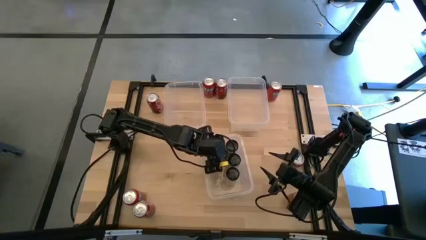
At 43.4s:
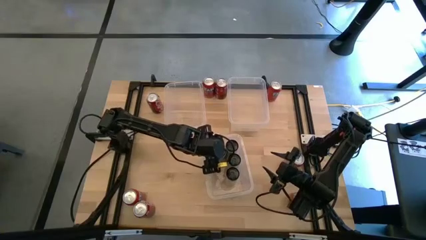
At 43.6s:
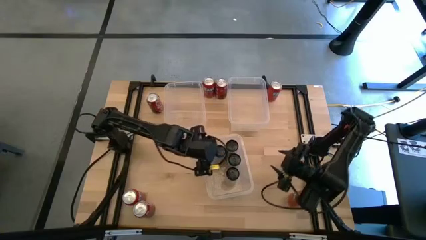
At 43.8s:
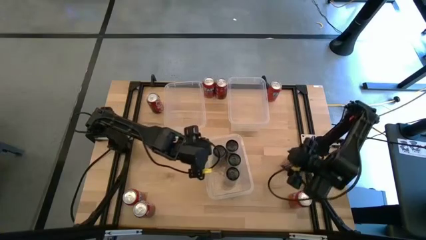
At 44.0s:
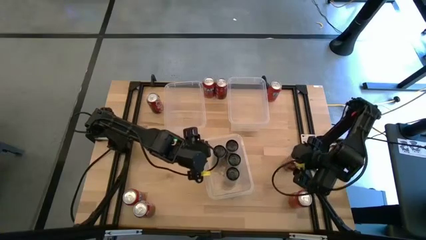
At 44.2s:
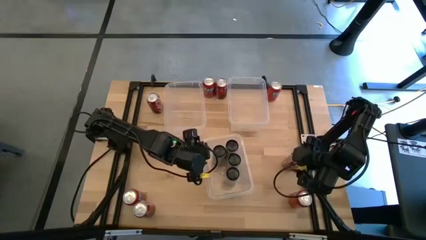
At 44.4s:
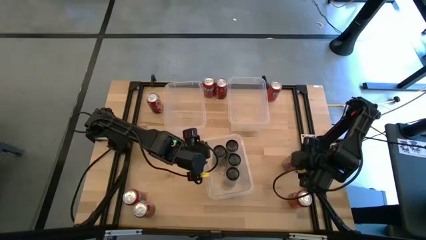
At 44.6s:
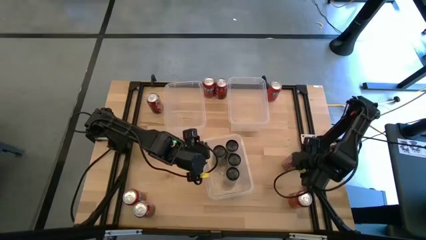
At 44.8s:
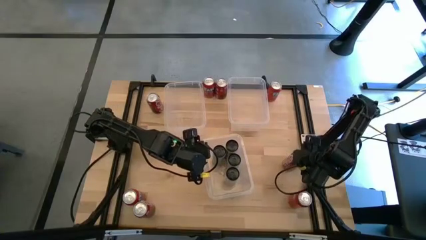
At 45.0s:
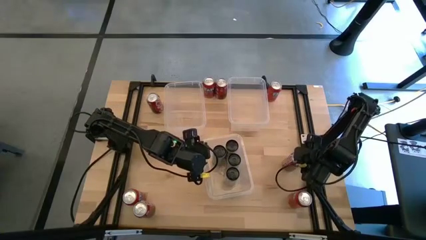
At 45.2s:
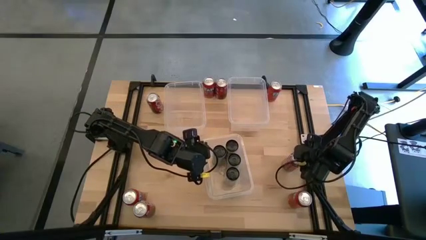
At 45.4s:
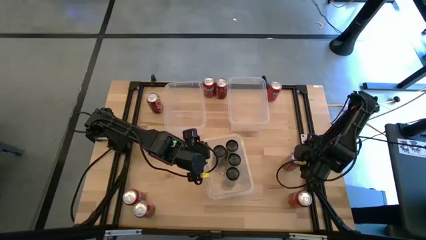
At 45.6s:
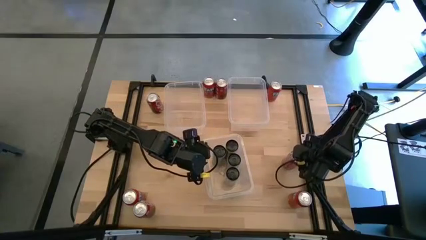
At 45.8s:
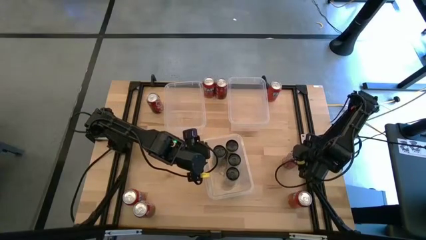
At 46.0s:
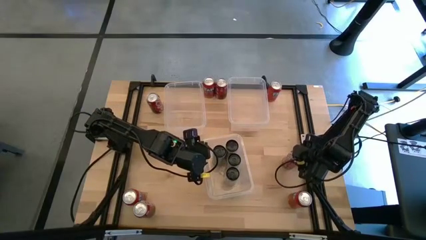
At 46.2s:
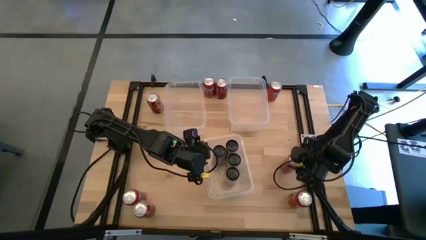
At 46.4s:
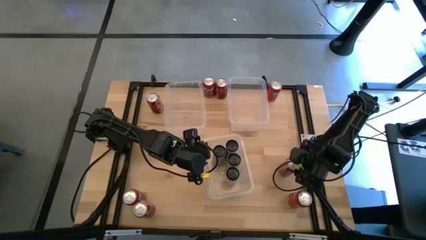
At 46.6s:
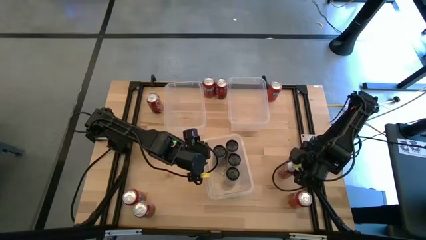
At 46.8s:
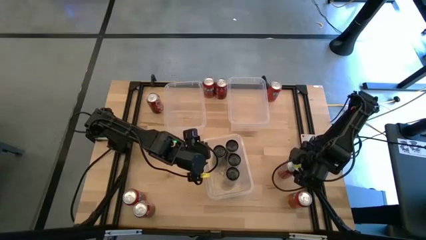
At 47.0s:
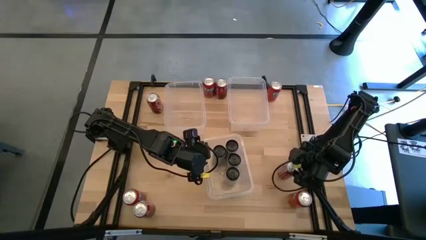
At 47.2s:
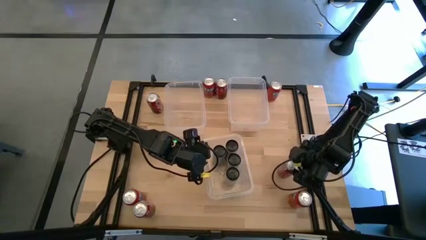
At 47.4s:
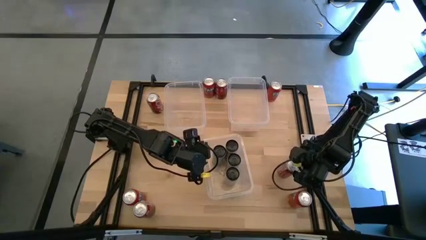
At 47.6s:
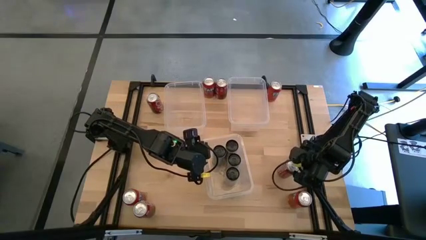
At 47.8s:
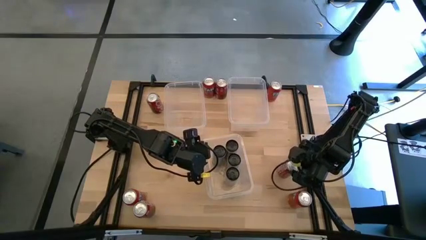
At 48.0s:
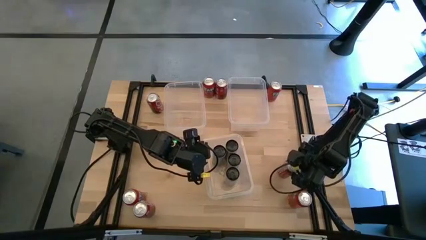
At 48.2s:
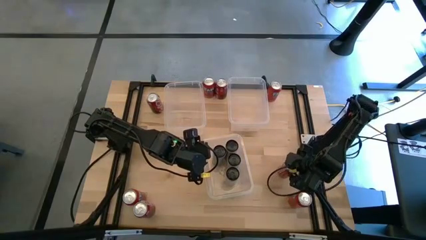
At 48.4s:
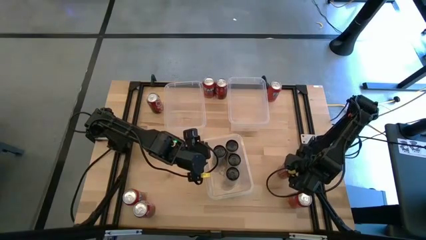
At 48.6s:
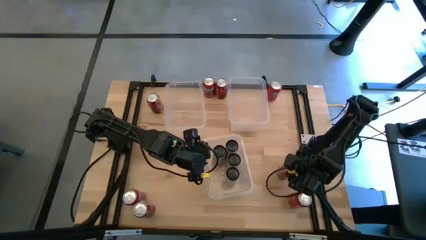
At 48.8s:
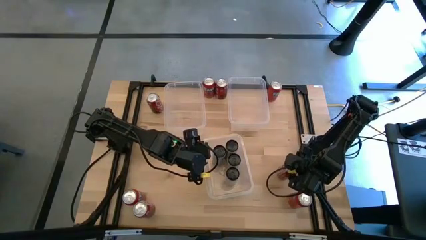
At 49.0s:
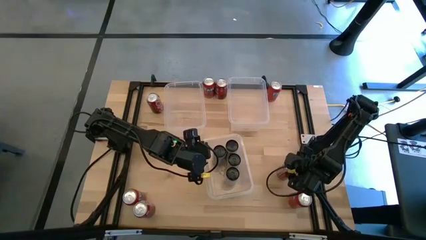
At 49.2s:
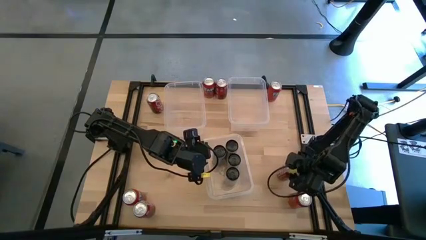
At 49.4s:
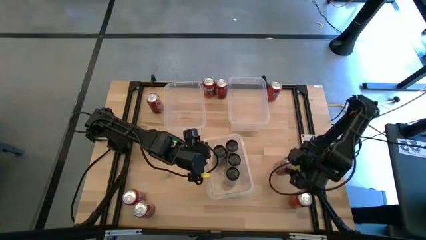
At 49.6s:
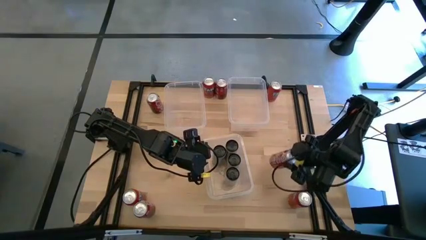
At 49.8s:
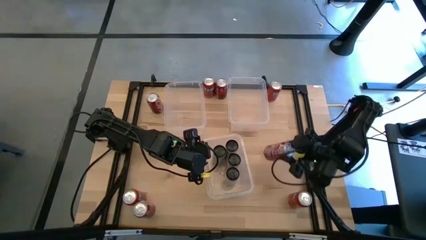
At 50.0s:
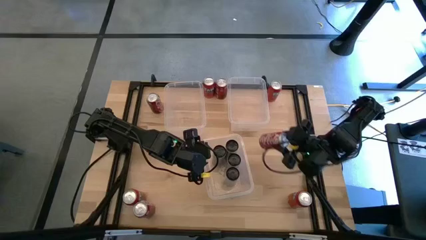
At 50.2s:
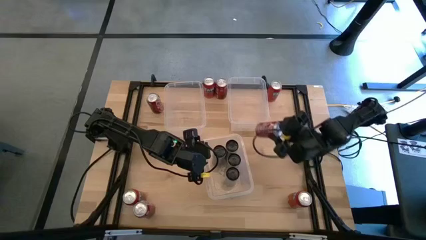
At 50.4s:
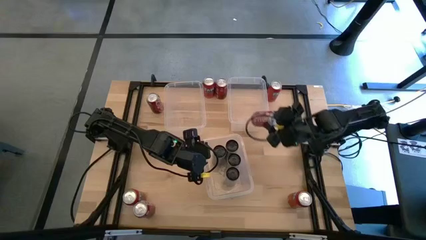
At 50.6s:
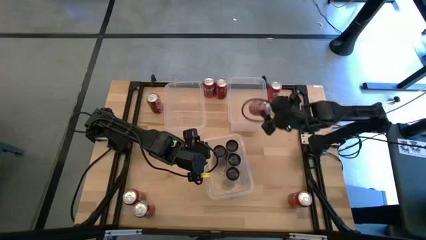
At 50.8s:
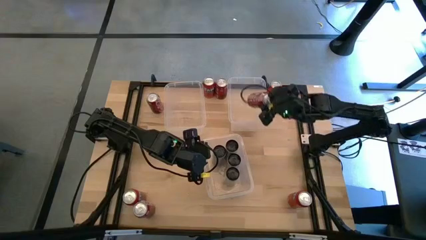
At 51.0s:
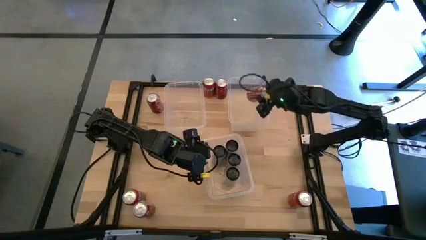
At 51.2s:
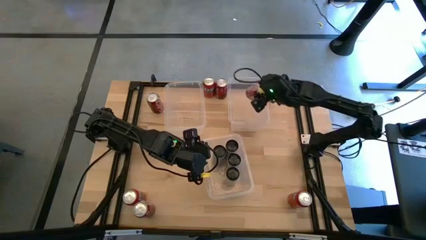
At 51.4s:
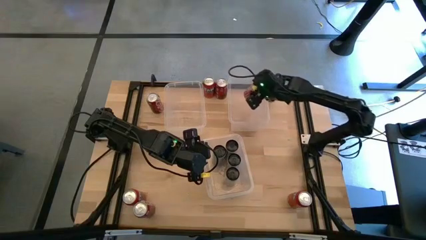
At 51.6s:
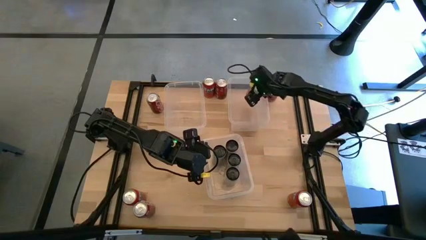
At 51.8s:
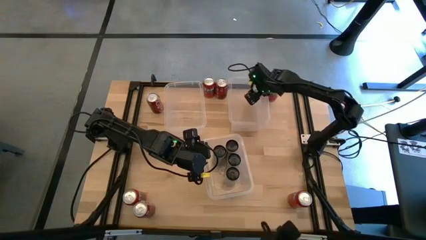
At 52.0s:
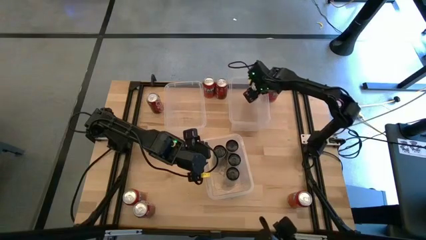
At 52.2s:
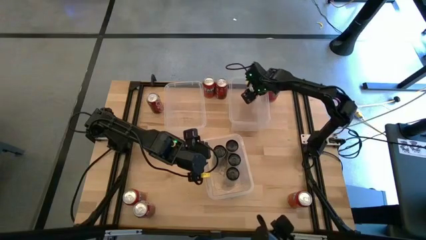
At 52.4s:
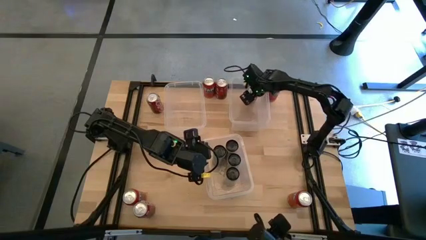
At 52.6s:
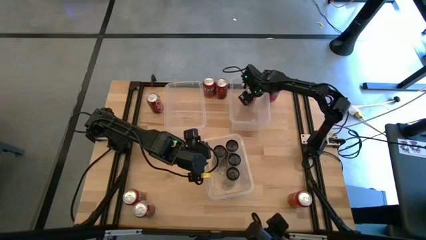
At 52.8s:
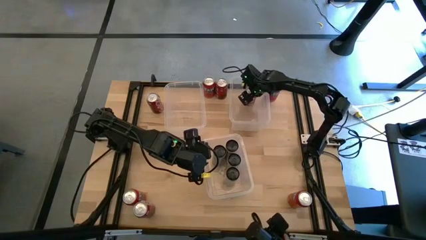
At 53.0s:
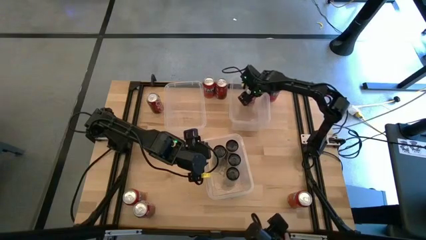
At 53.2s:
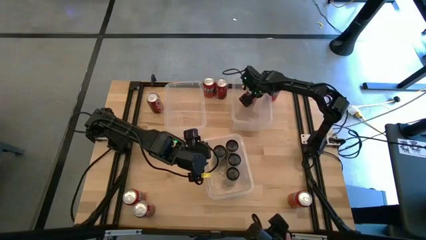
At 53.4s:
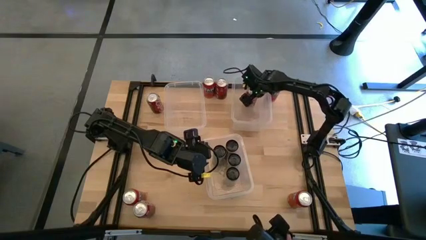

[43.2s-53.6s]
Task: Sort soda cans
Put the red/white soda can into the right transparent bin

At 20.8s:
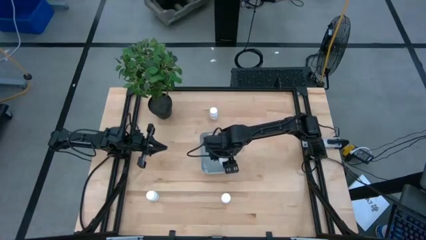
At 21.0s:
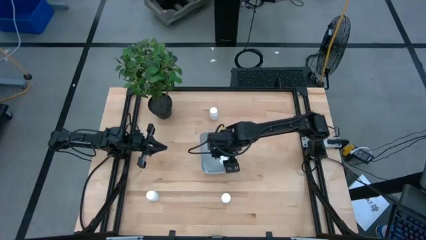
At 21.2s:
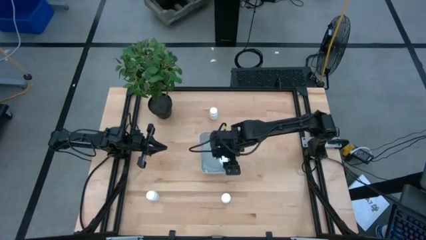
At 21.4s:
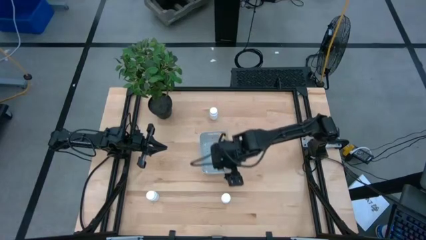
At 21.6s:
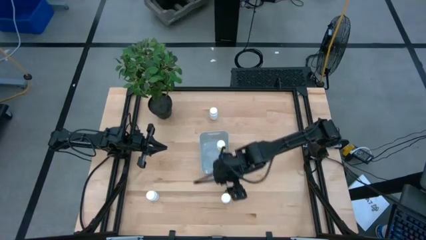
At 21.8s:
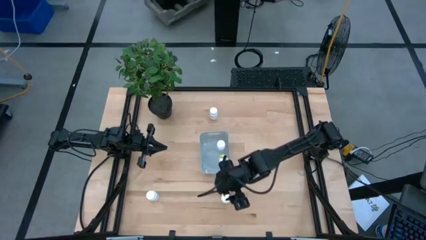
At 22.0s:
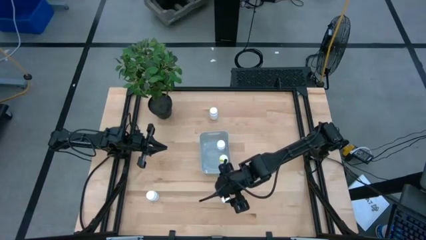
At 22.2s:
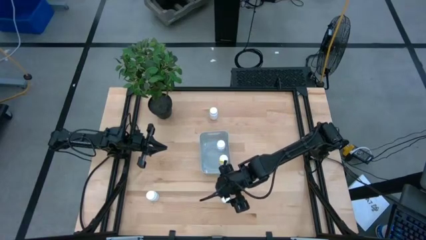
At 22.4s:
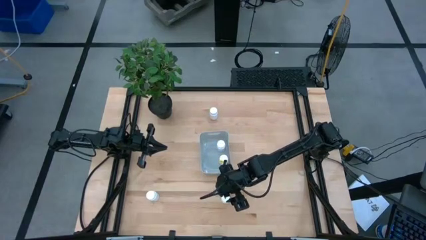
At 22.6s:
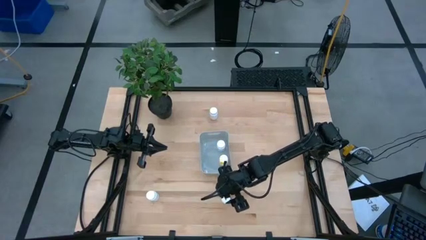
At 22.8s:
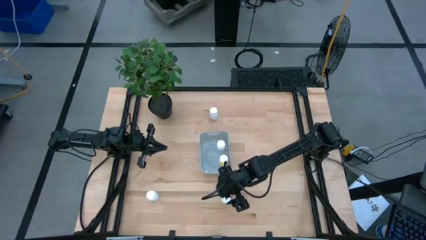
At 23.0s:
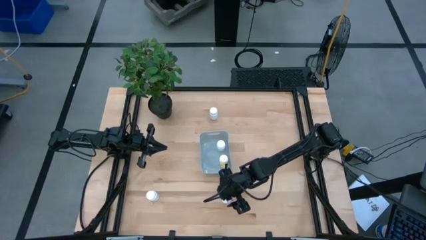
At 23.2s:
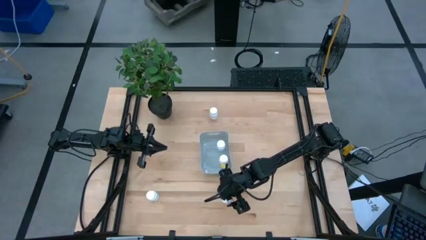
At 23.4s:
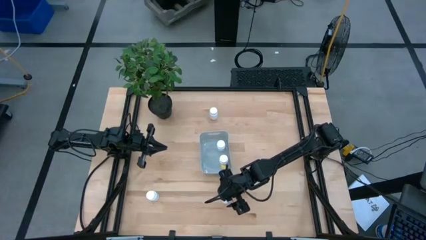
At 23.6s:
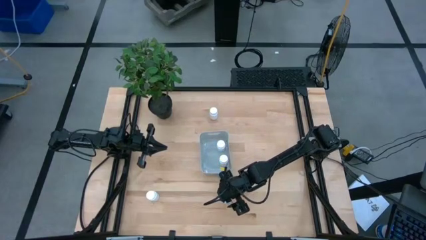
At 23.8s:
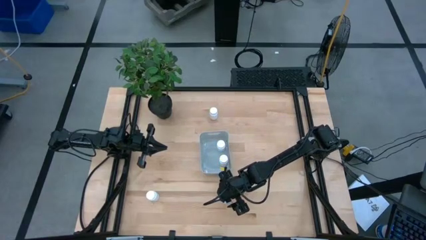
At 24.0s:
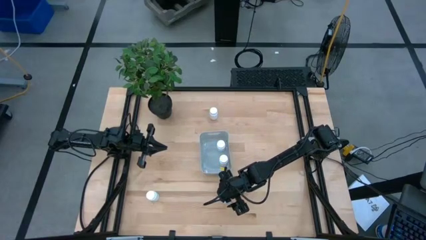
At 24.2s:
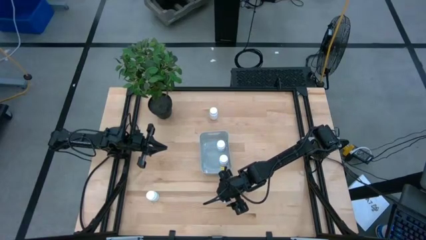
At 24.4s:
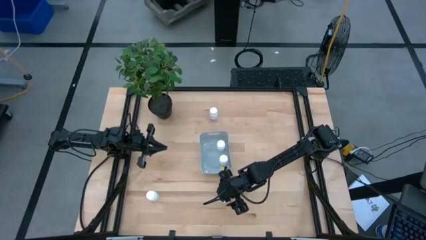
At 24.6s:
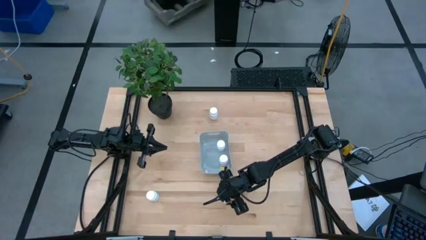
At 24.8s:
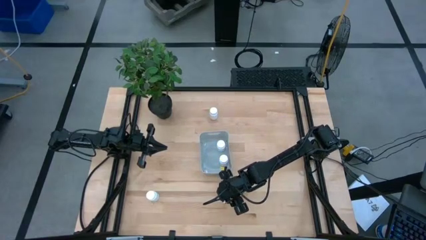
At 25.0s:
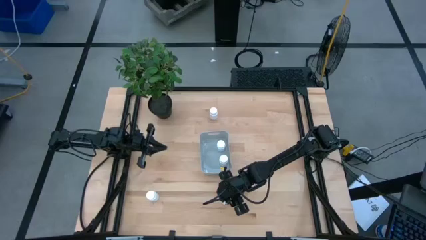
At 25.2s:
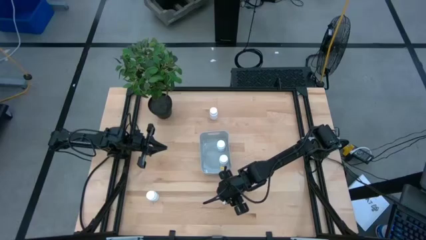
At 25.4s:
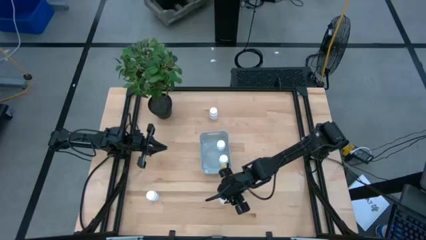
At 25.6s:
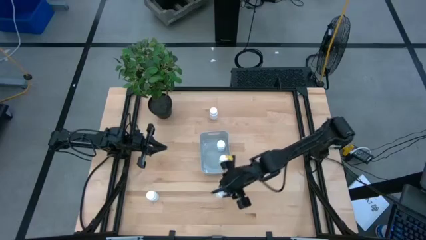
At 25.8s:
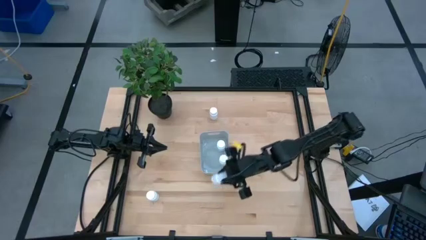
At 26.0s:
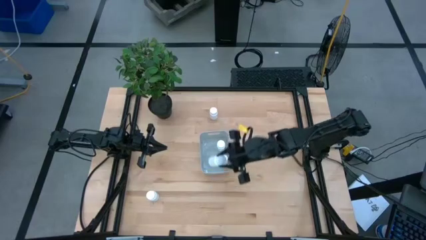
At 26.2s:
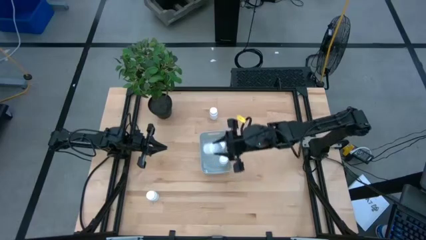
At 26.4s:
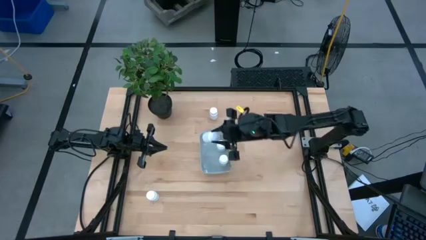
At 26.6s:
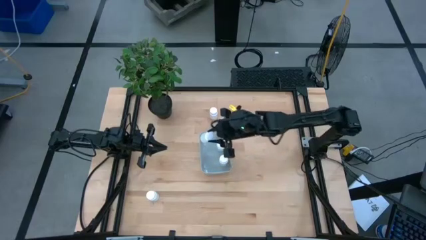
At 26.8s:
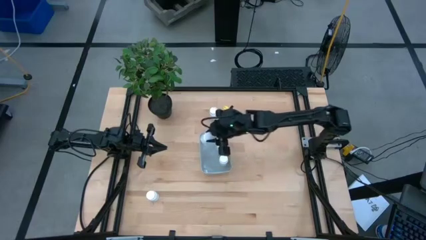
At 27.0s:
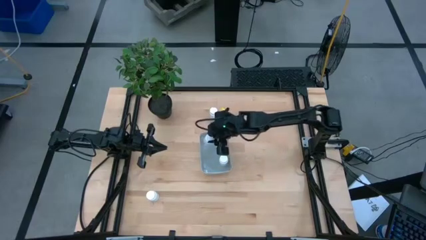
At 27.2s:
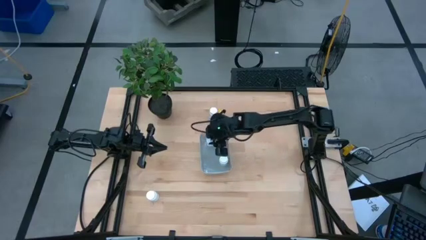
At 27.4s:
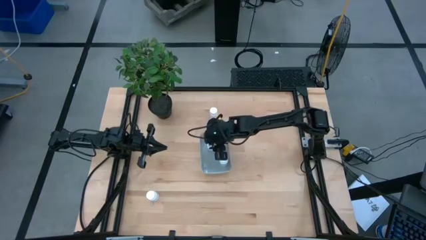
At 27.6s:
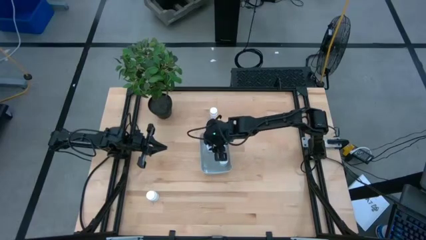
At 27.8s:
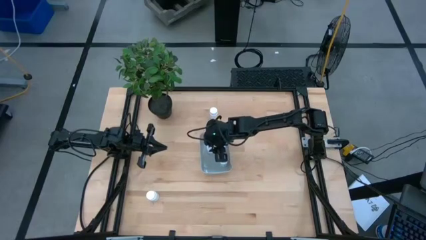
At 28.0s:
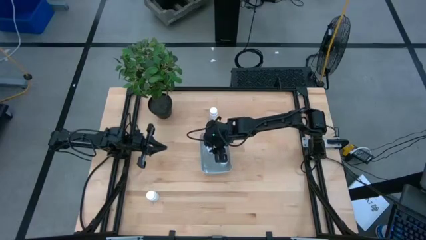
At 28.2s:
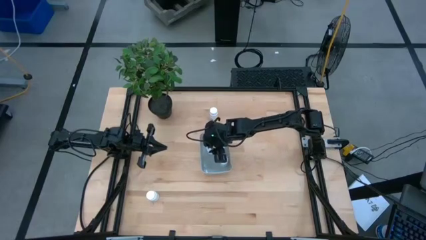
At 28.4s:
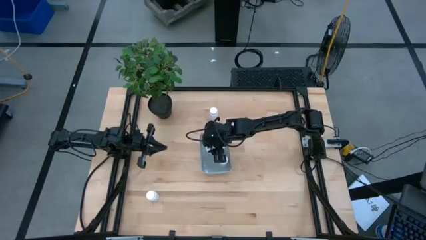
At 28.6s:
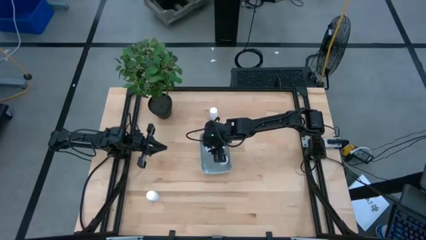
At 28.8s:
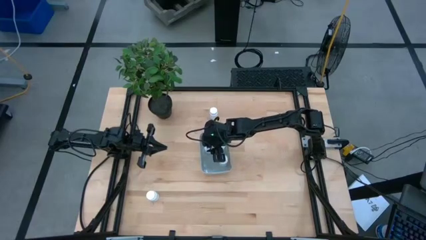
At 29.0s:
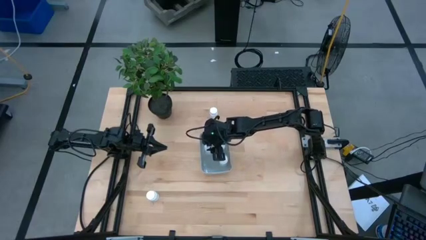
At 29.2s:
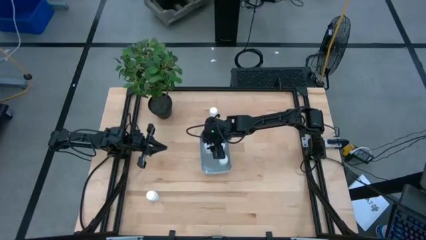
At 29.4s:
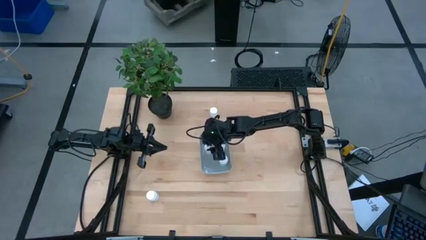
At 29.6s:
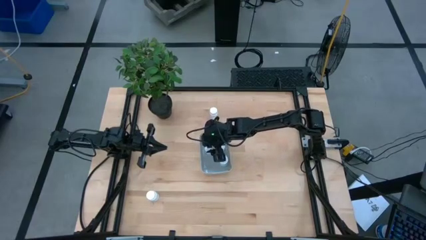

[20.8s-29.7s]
Task: Pick and place pill bottles into a basket
Put the white medicine bottle into the gray bin
